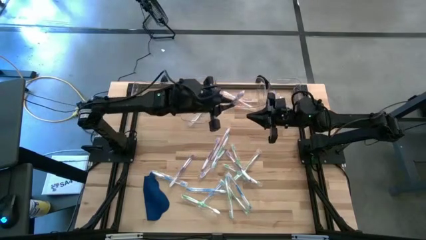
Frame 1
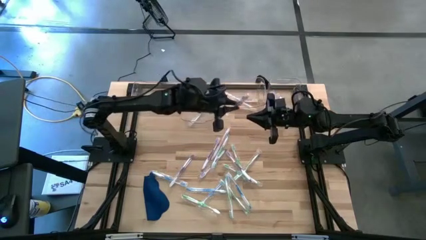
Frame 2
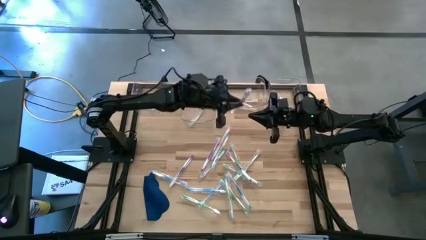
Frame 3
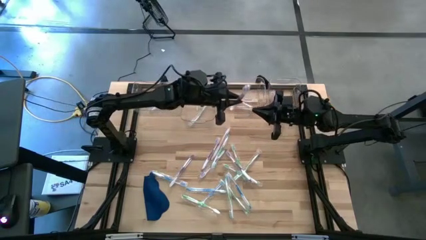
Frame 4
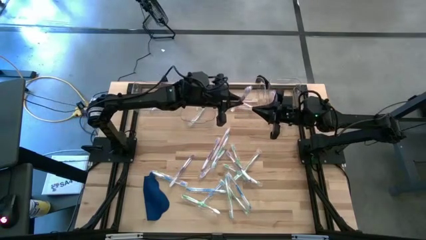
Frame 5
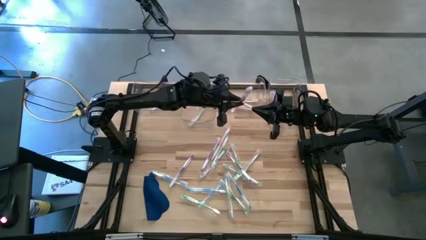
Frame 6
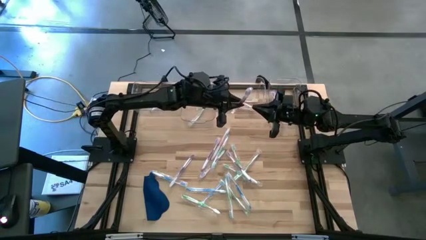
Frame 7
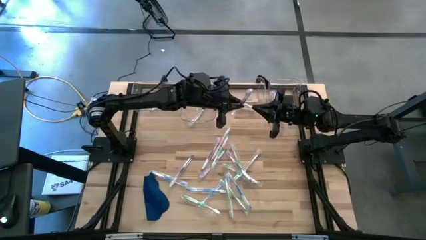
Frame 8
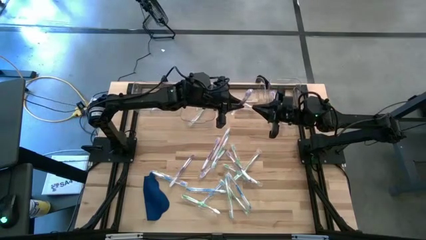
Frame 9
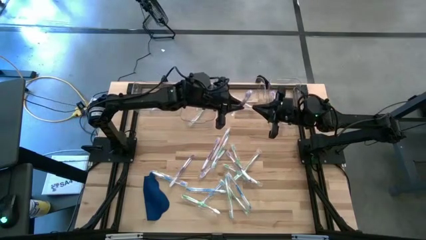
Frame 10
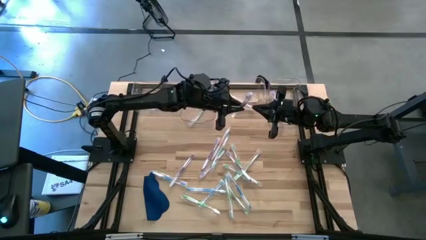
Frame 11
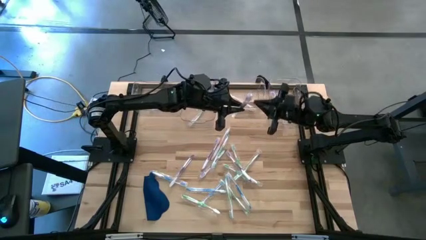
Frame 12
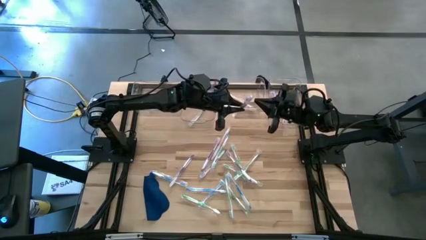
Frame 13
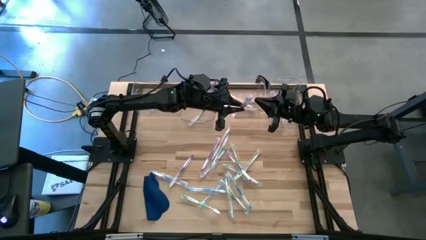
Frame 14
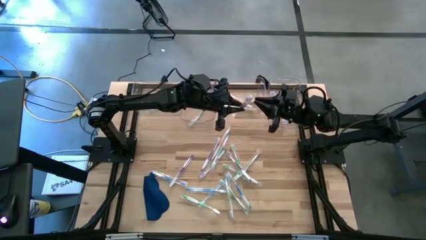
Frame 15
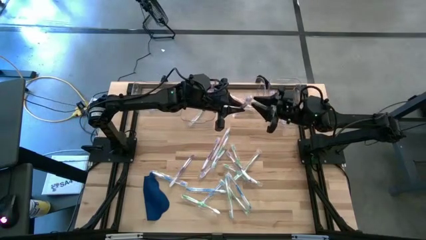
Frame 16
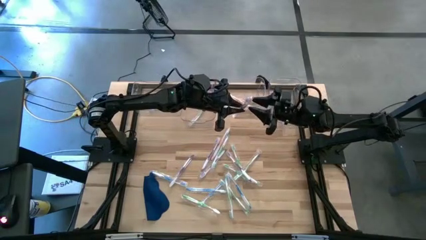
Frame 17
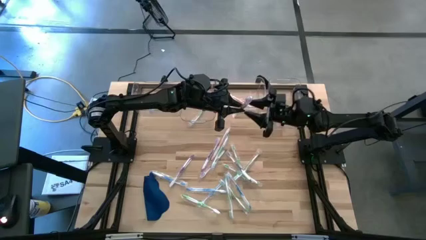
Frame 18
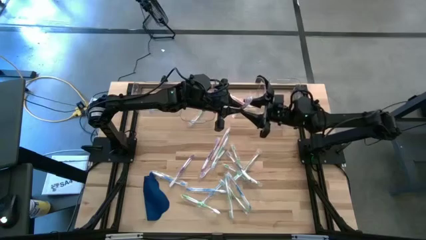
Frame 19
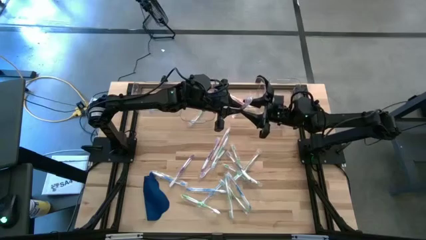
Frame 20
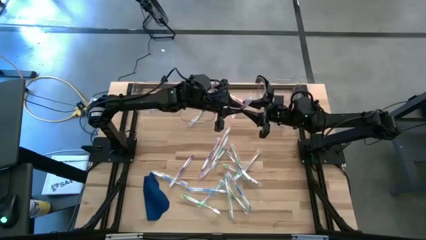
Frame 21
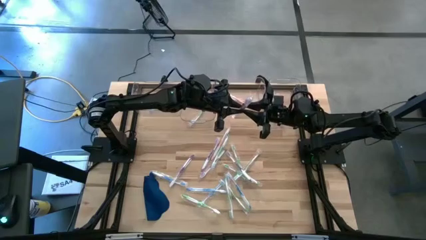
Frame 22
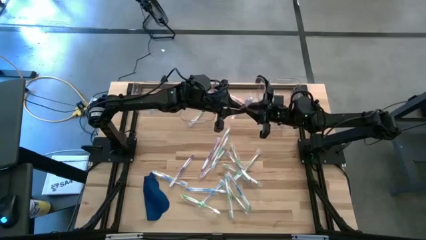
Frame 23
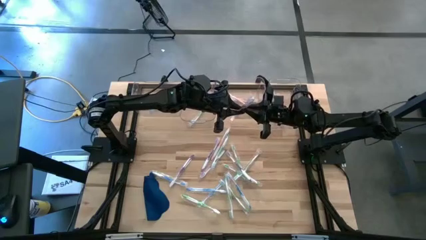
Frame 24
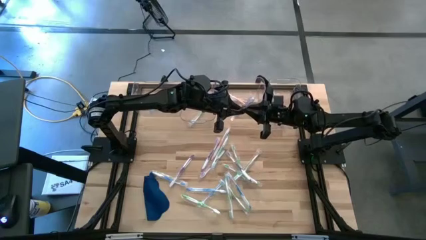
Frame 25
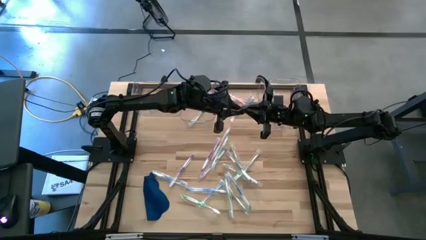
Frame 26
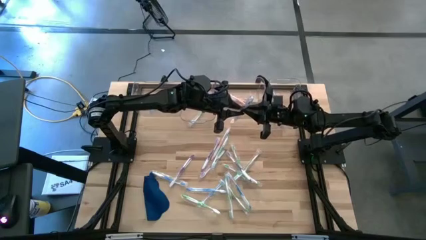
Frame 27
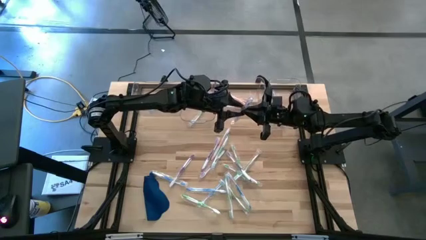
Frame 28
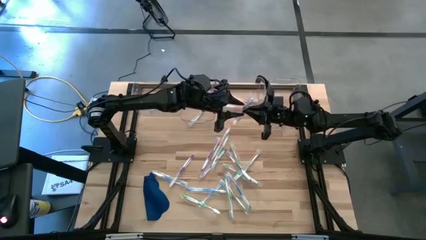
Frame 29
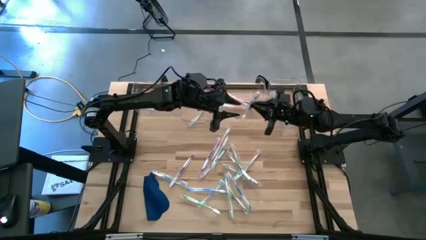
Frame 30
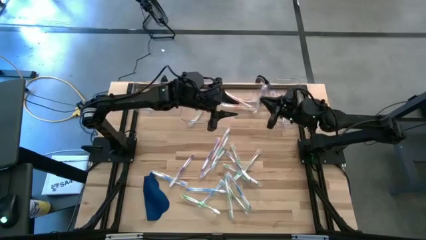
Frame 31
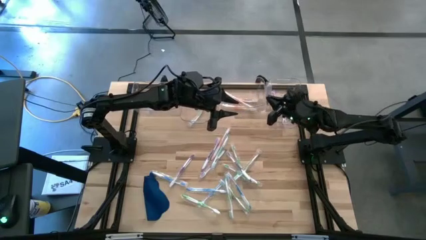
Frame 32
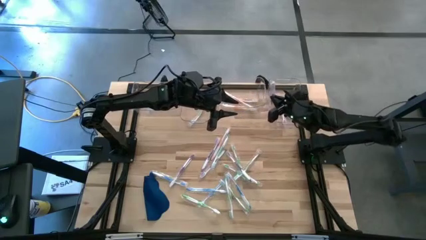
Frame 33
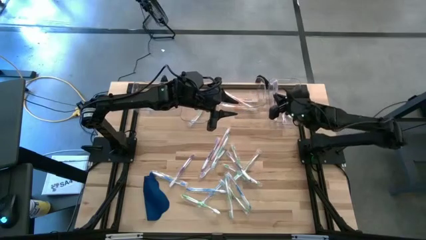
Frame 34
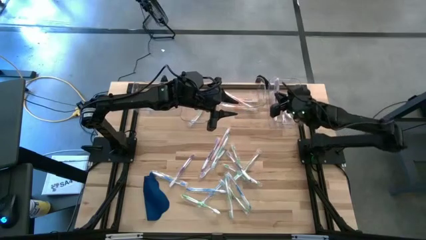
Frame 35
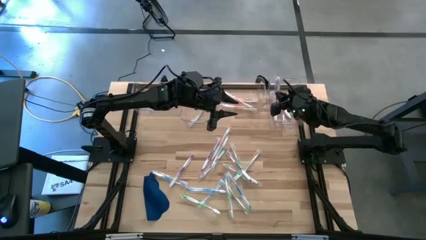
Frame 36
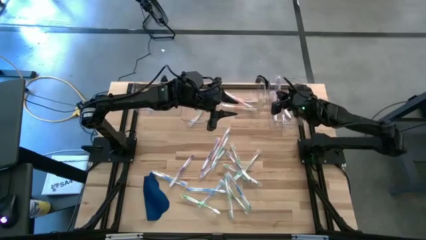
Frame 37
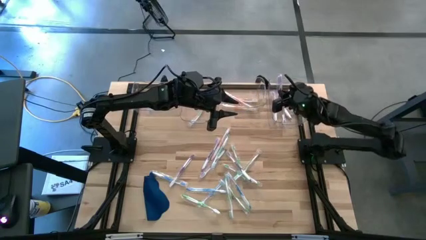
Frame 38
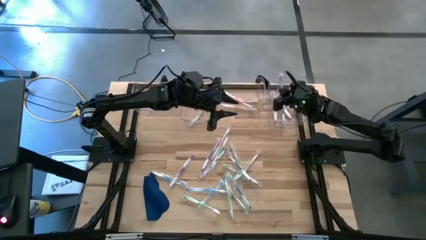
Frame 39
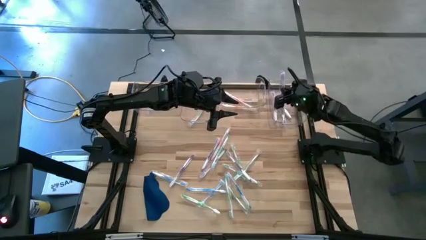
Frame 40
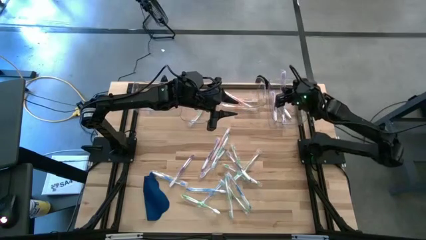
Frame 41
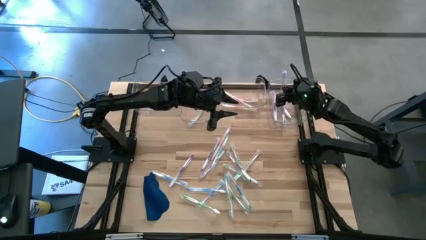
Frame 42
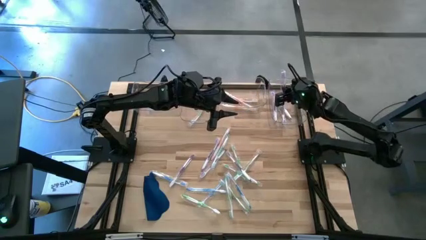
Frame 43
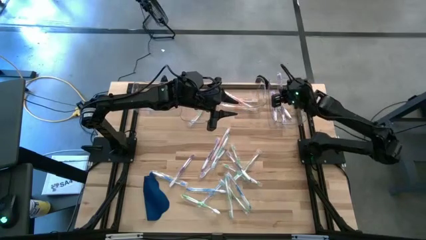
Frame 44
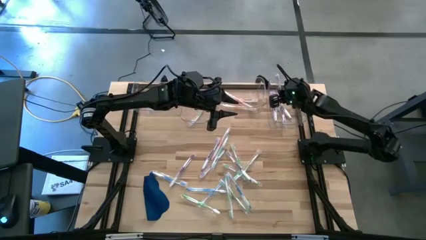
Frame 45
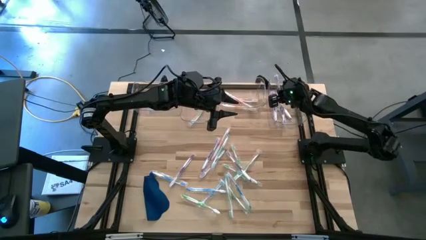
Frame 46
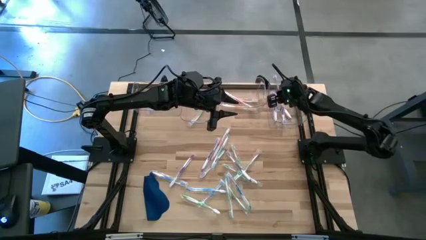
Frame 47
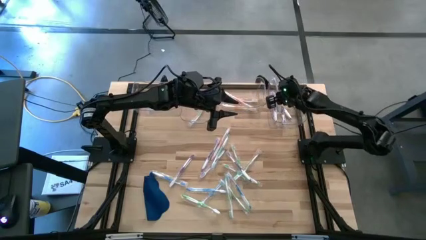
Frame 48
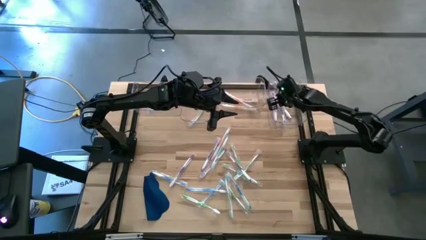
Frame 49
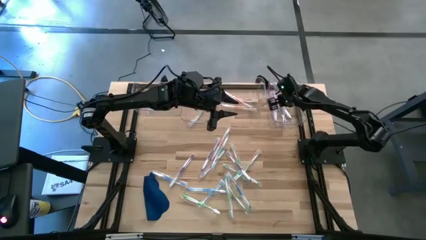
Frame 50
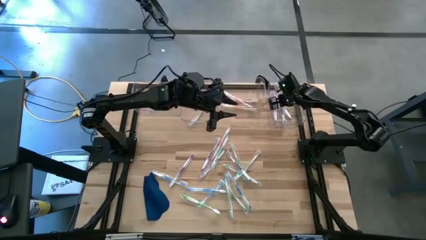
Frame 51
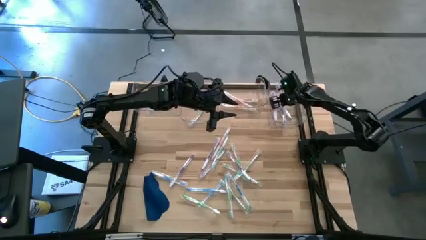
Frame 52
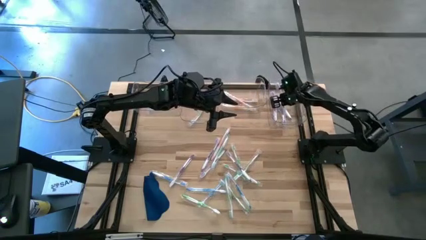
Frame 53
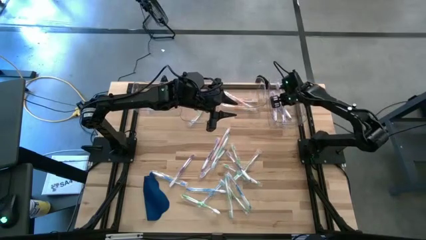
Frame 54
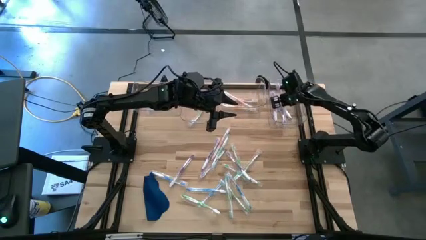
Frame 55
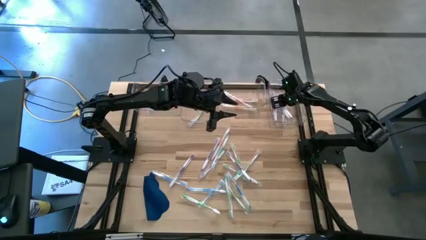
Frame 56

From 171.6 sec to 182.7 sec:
Task: Pick & Place Toothbrushes
Put the purple toothbrush into the right transparent bin

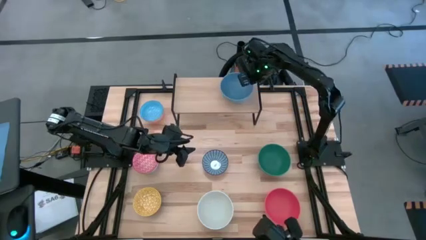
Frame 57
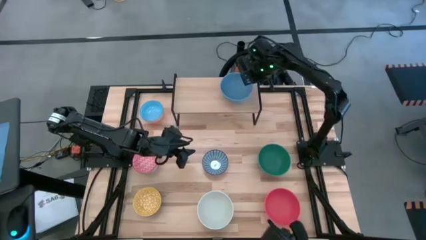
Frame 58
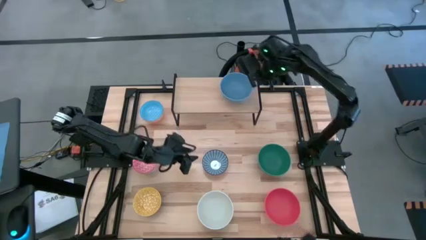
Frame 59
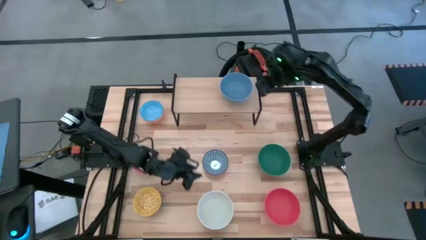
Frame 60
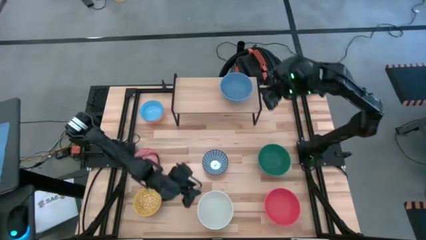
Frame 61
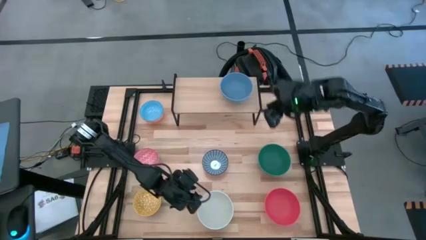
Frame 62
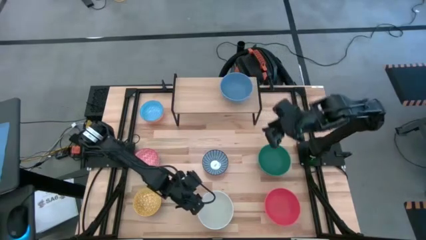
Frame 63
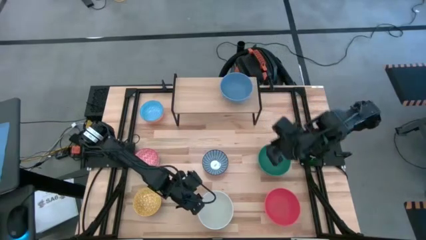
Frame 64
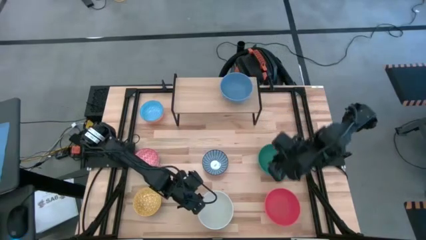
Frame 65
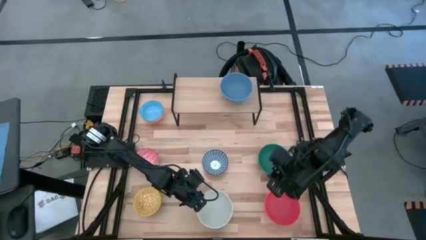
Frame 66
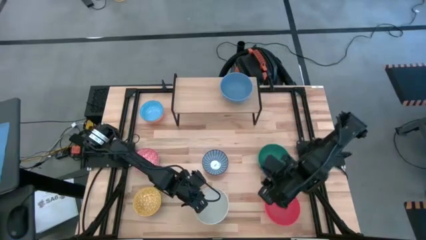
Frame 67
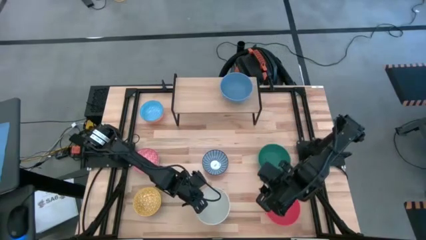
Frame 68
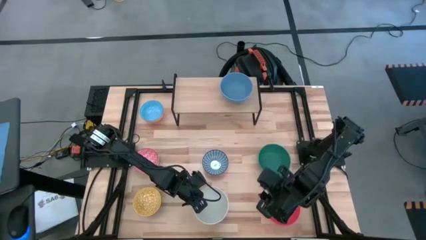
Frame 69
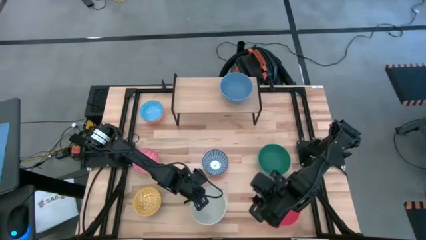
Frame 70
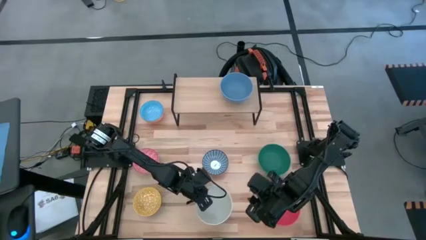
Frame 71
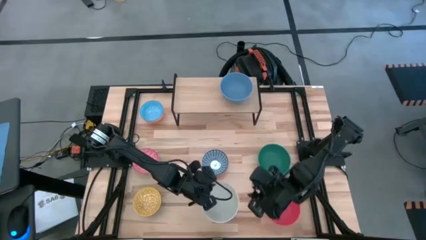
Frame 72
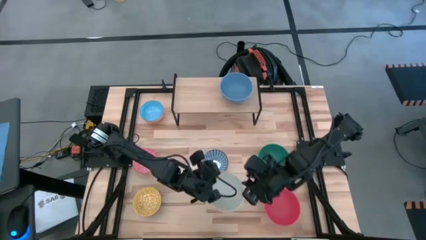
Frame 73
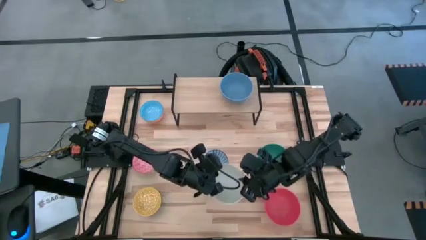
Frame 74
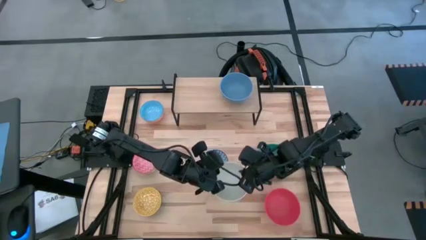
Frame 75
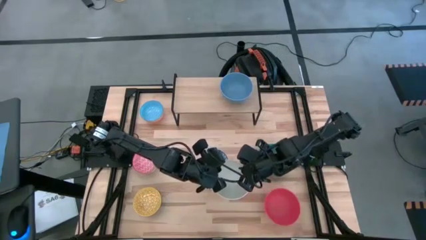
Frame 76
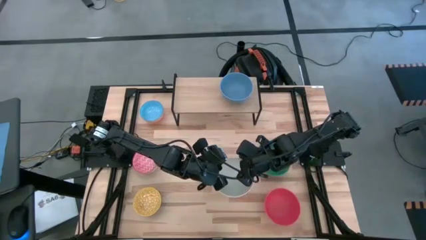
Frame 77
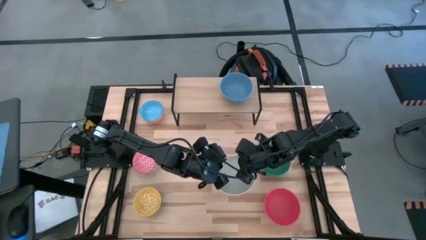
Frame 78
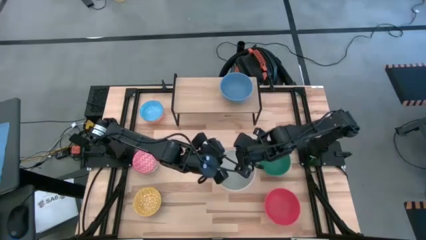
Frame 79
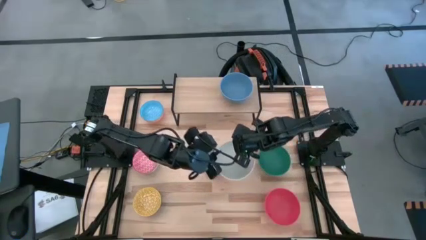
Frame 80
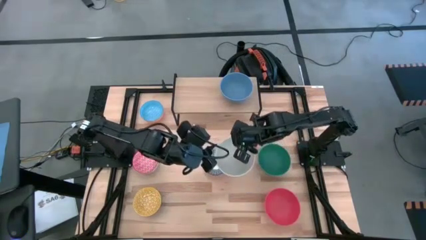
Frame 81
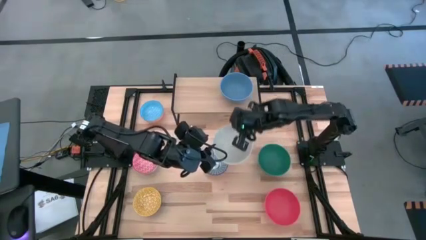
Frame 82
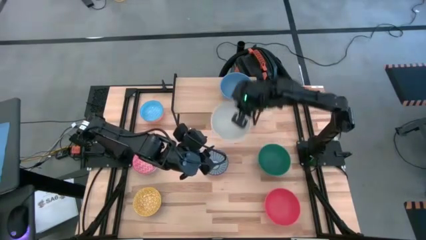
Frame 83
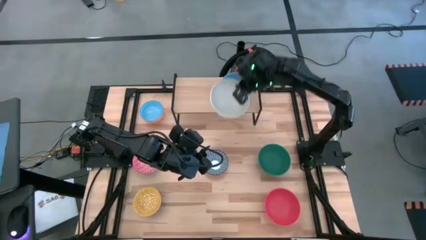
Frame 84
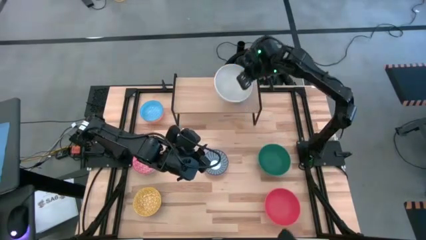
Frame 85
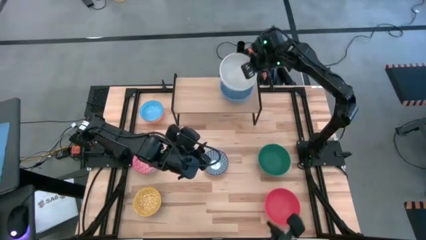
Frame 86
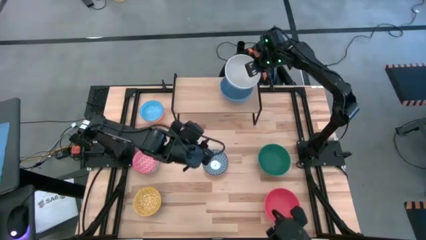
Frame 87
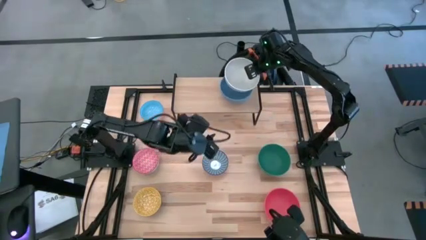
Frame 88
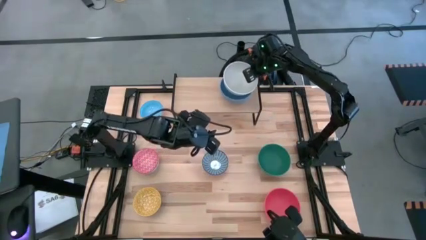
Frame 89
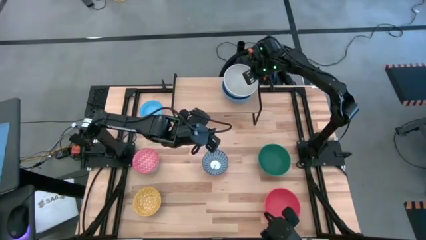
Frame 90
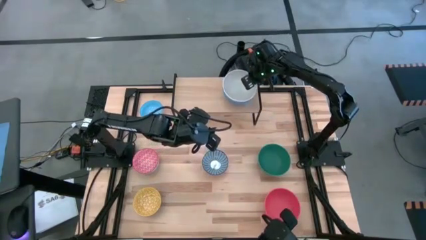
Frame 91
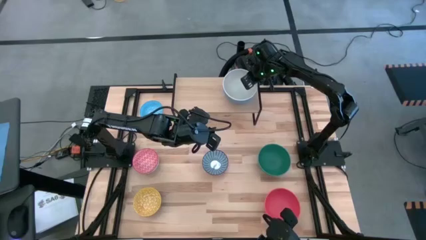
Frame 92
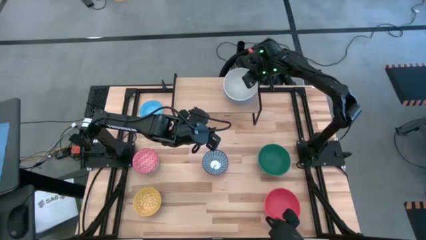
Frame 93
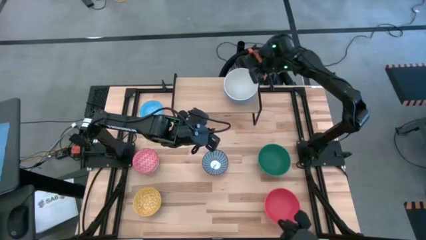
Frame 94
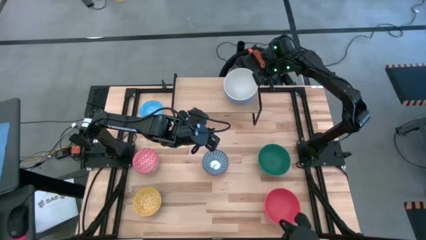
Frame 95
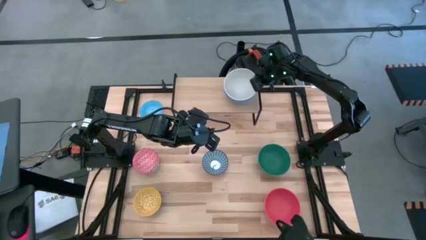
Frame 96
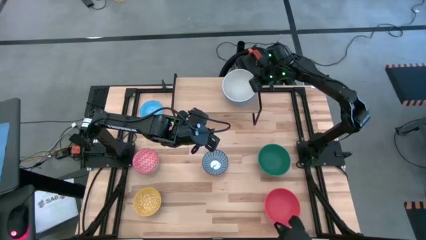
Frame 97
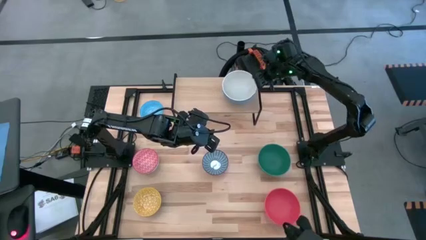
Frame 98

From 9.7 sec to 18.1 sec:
Task: Place and stack bowls onto a shelf
Stack the white bowl on top of the blue bowl on the shelf
